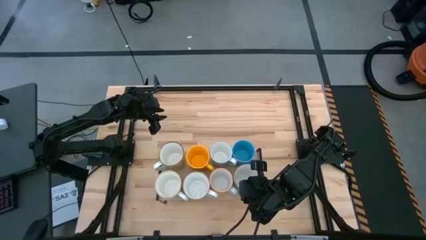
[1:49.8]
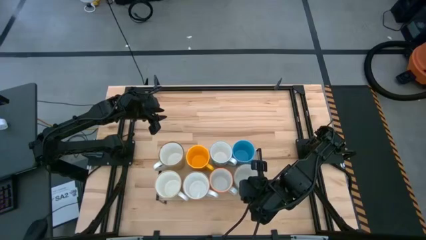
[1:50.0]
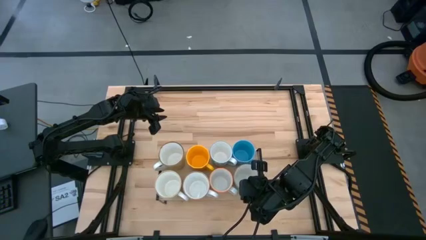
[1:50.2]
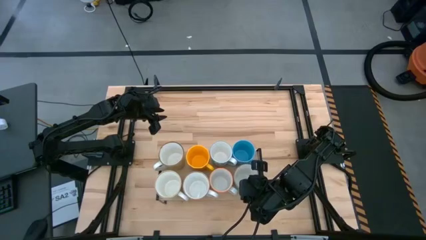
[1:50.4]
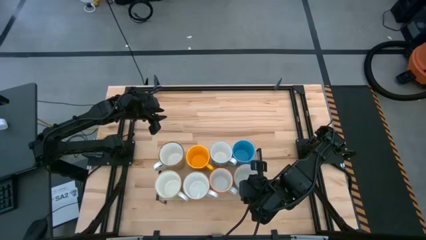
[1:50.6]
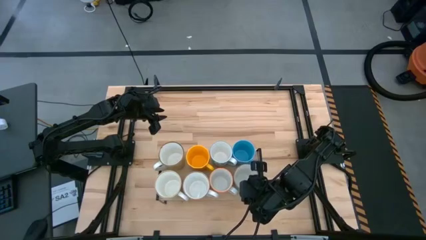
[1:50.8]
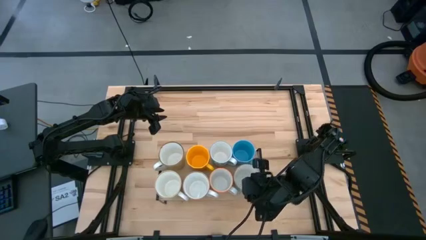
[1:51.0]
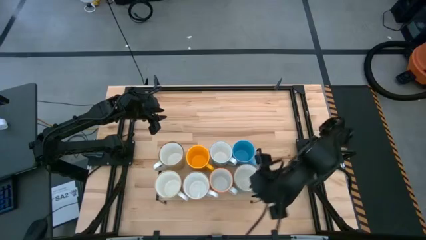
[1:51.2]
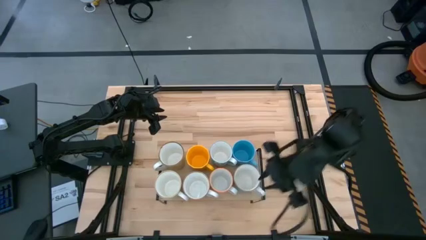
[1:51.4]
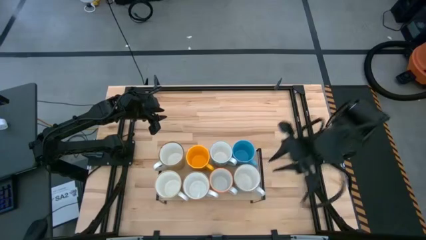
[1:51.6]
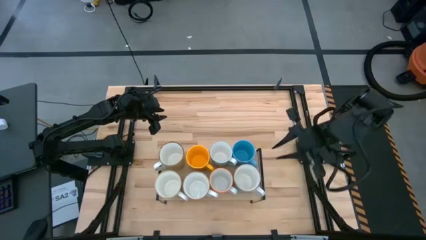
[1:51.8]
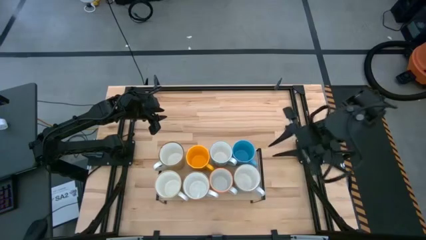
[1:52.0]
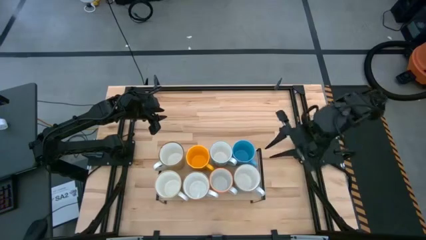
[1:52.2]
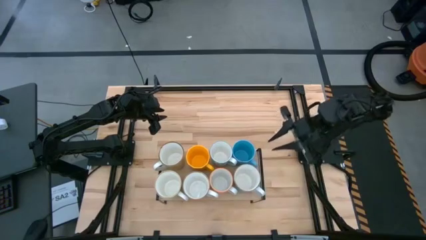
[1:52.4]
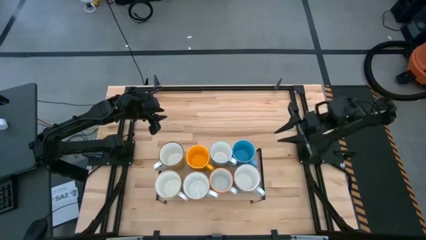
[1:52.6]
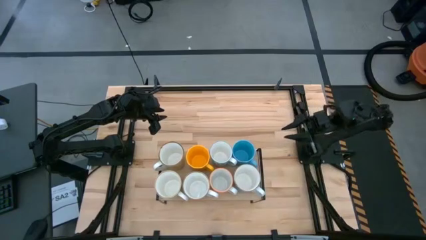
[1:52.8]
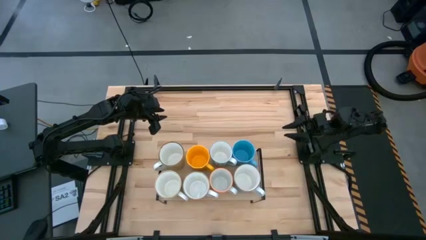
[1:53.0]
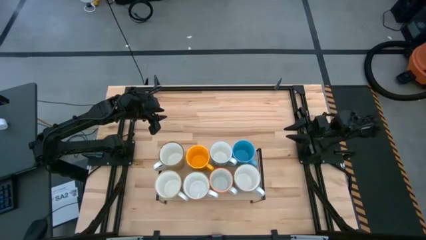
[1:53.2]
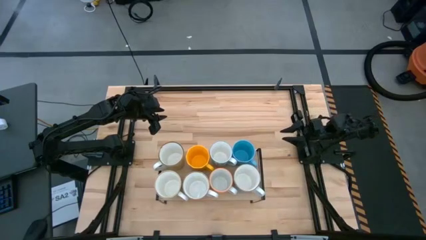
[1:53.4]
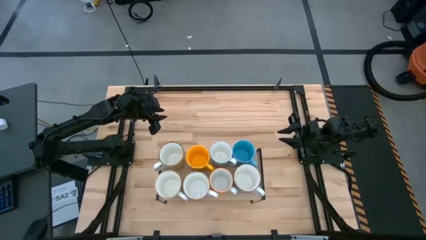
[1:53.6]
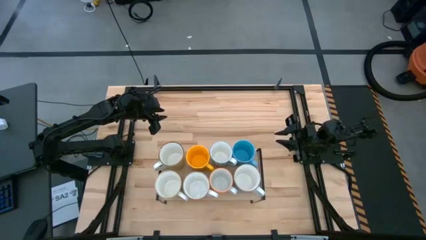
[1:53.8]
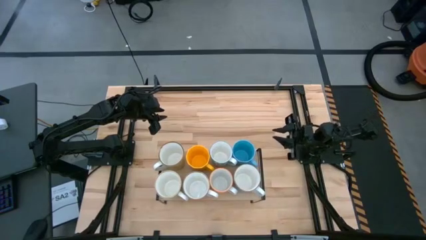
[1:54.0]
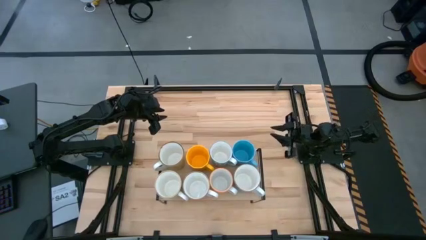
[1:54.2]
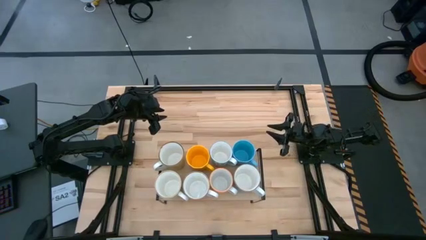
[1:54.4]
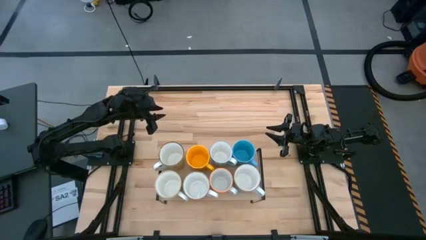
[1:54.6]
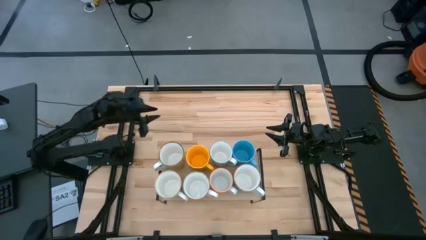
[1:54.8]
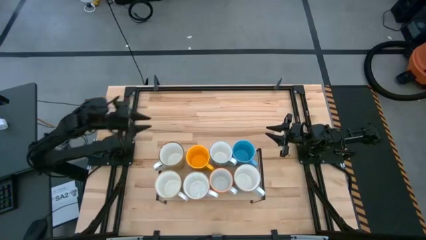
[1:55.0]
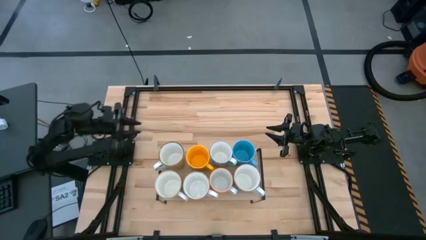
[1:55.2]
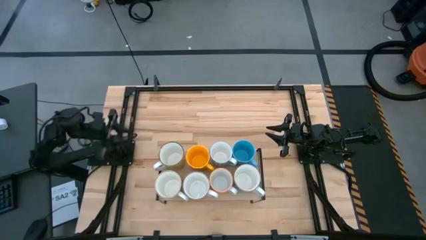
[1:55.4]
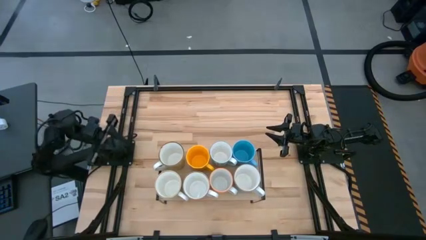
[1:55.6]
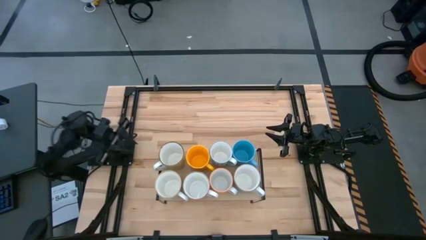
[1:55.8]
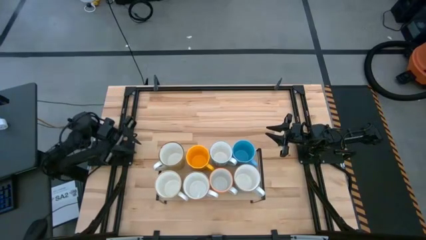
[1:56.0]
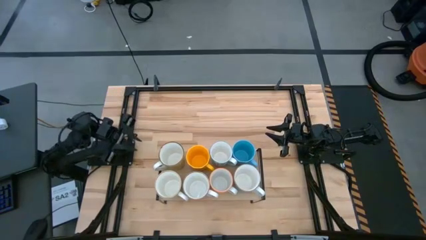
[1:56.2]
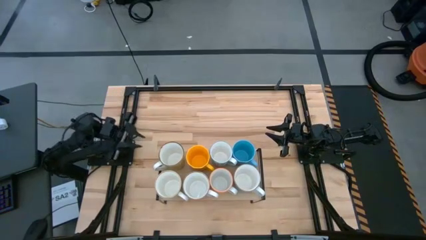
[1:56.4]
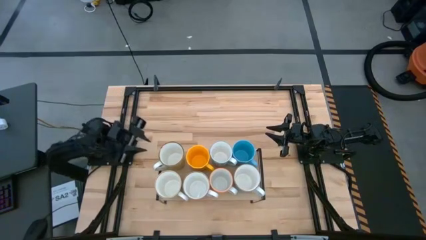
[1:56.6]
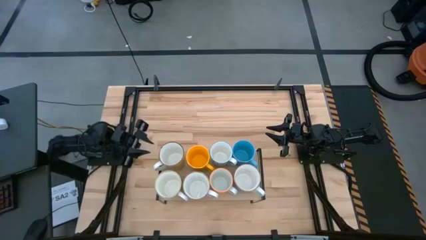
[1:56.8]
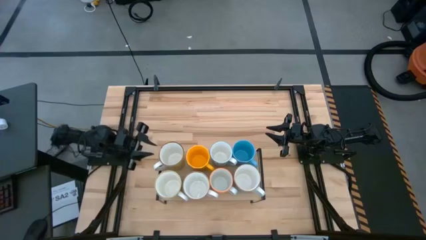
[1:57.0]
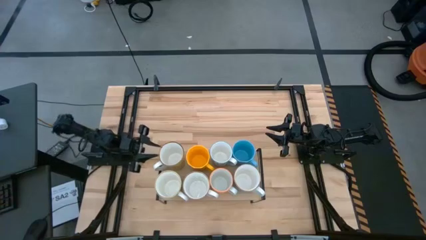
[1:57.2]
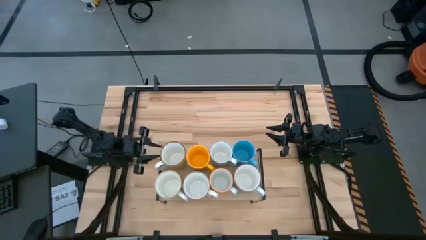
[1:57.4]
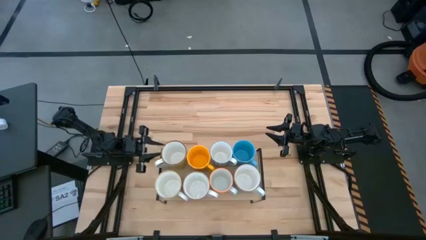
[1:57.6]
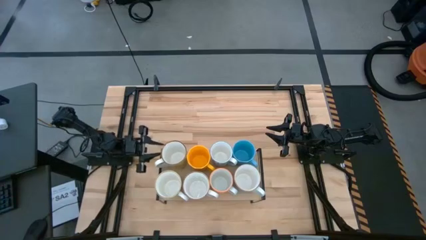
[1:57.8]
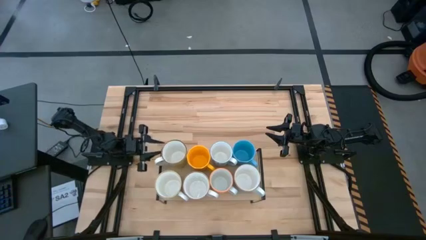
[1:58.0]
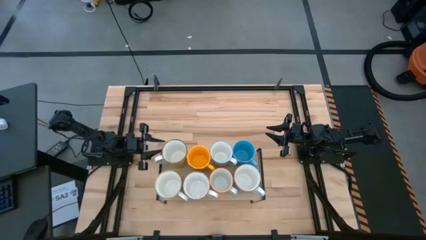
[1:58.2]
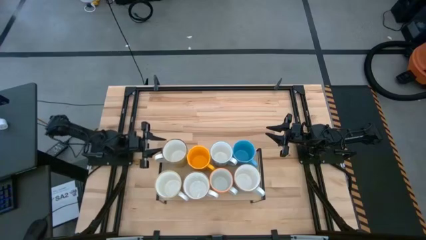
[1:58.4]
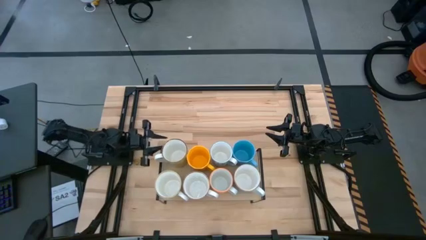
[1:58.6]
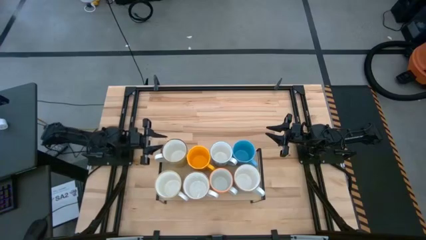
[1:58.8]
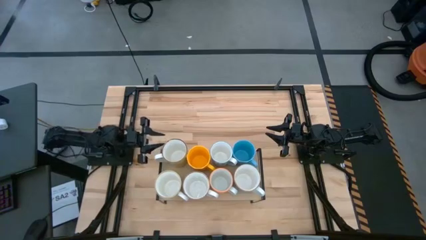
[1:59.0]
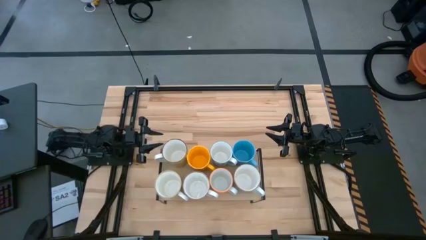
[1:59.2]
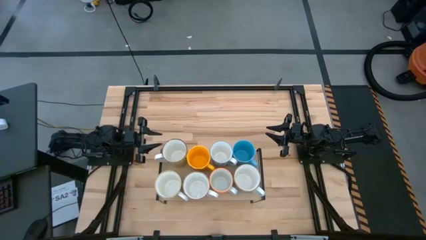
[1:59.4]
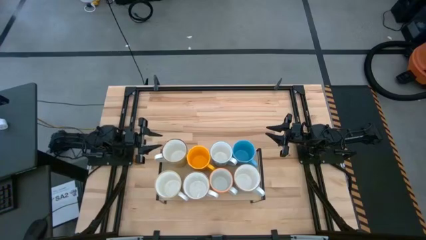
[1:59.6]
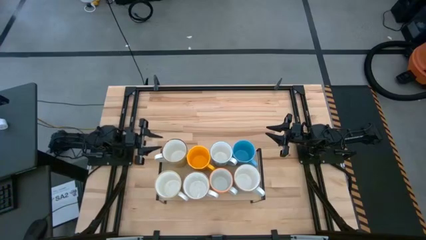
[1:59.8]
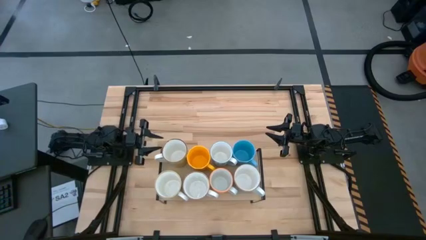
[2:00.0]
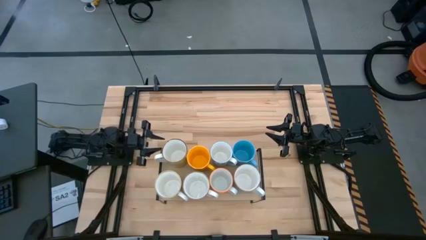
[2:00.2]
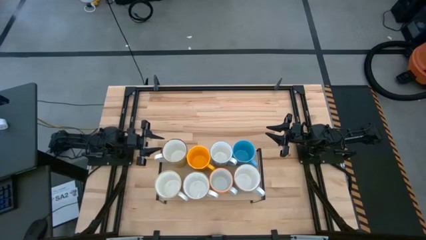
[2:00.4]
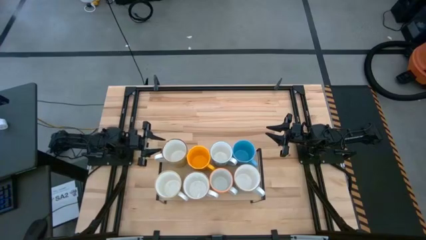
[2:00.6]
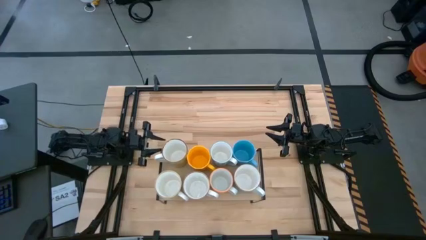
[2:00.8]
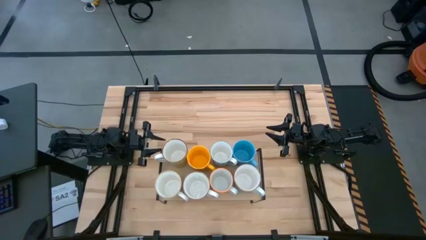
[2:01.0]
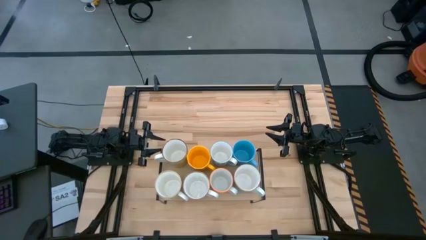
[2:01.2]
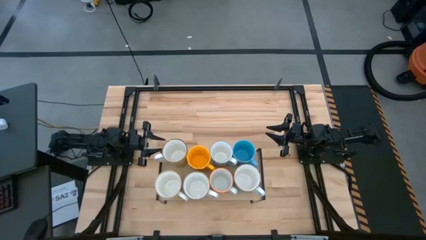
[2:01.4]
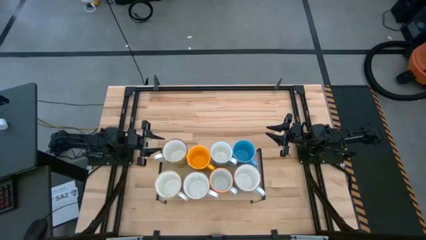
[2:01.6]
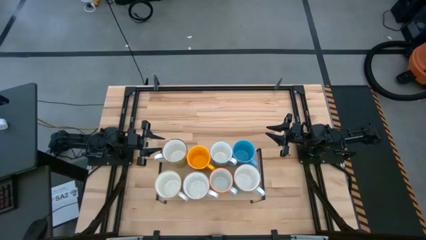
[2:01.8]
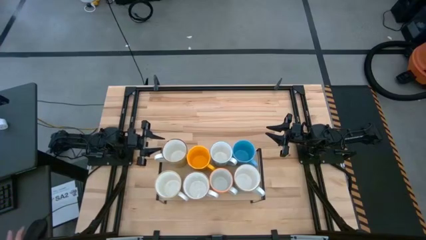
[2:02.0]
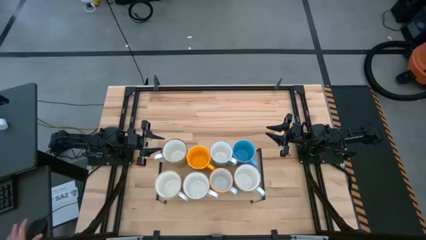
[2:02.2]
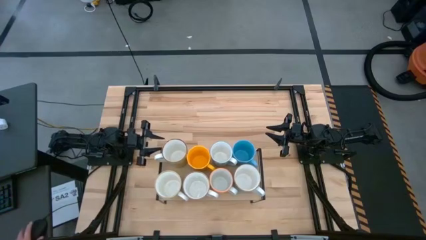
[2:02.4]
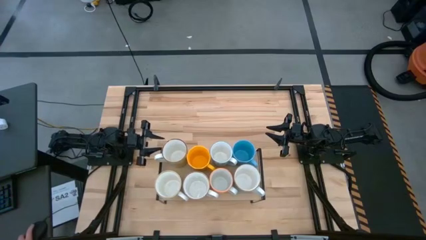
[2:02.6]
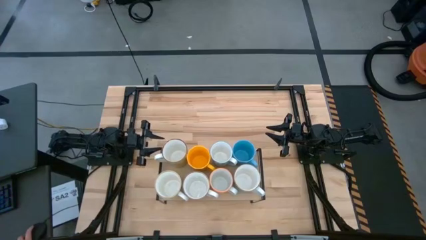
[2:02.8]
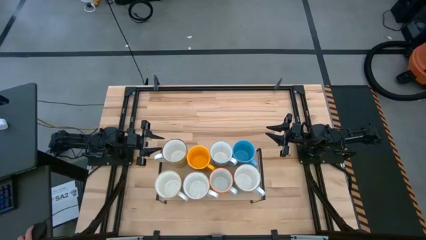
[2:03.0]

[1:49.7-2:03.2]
Task: Place coffee mugs
Return to Home Position

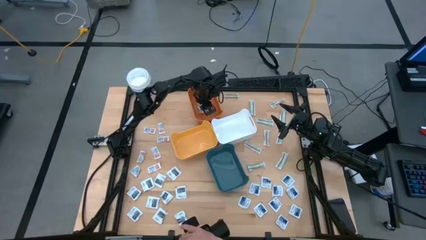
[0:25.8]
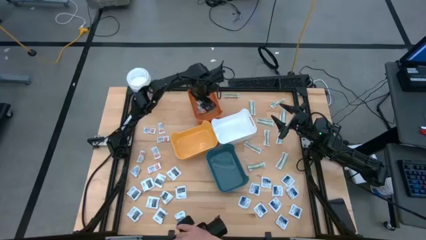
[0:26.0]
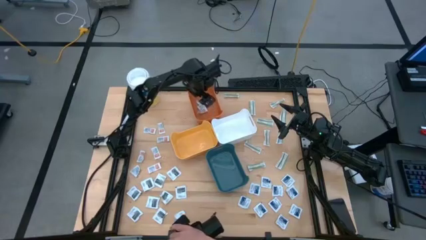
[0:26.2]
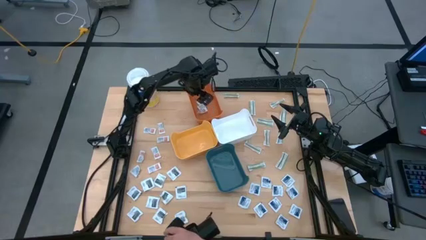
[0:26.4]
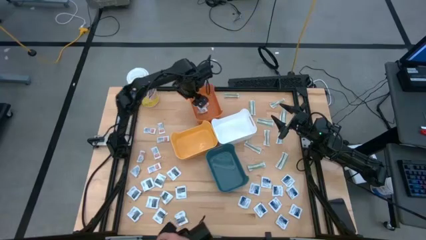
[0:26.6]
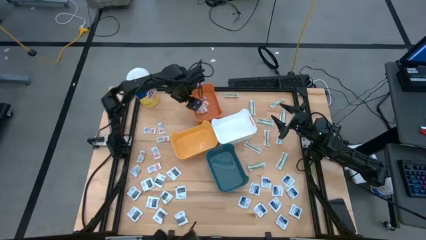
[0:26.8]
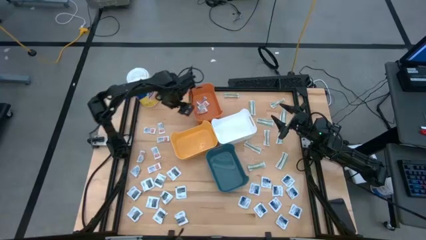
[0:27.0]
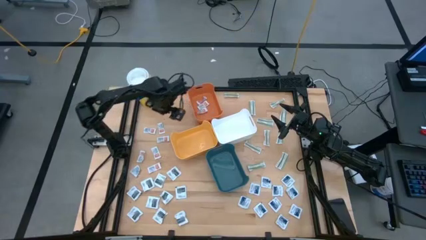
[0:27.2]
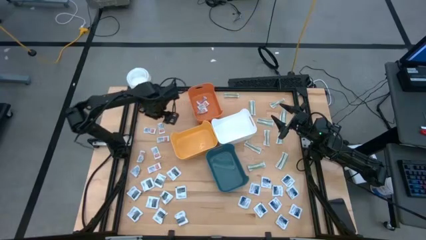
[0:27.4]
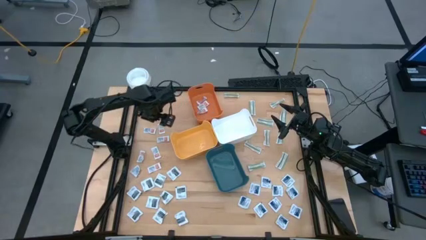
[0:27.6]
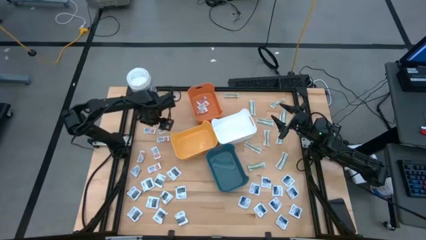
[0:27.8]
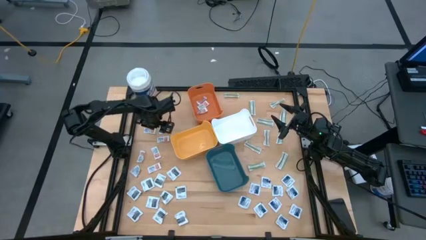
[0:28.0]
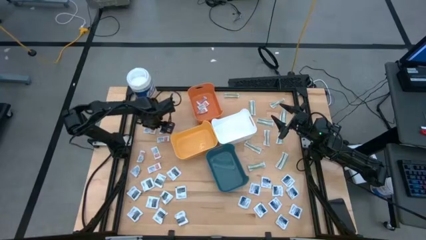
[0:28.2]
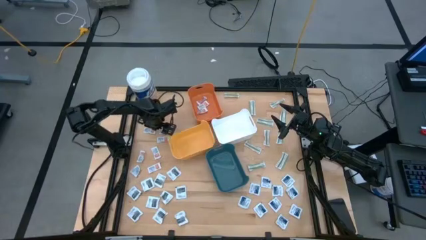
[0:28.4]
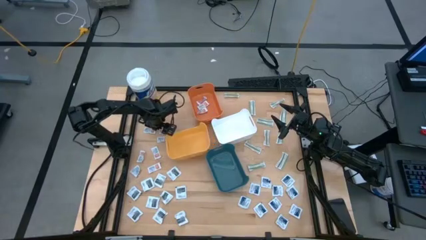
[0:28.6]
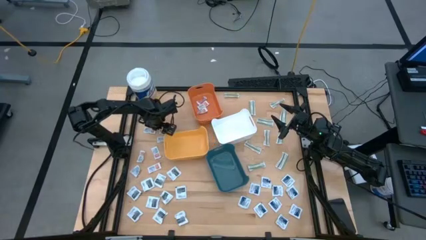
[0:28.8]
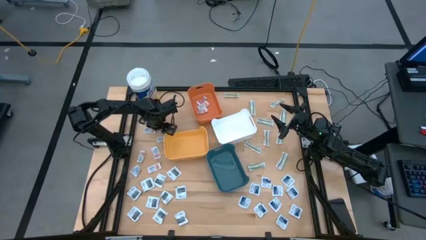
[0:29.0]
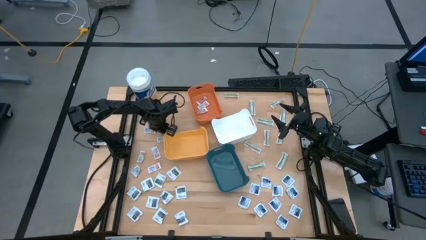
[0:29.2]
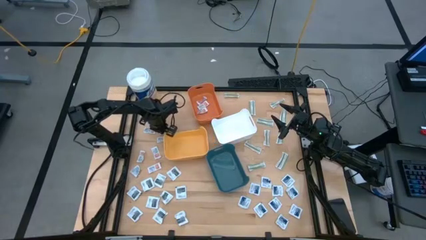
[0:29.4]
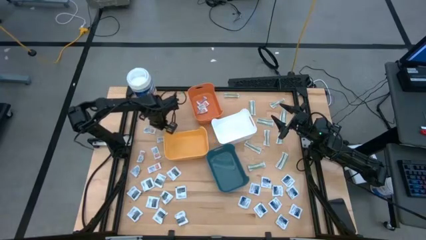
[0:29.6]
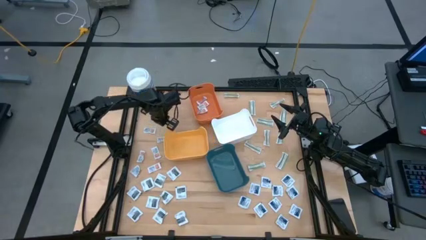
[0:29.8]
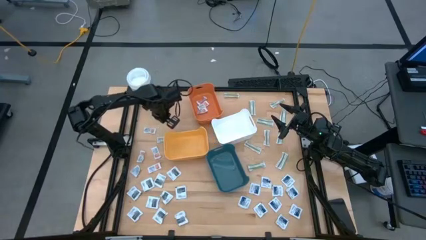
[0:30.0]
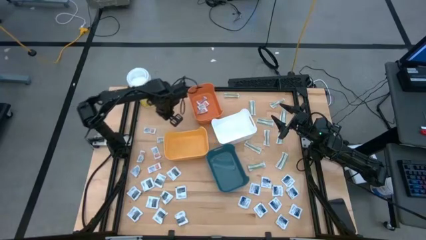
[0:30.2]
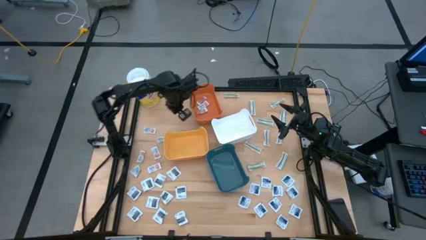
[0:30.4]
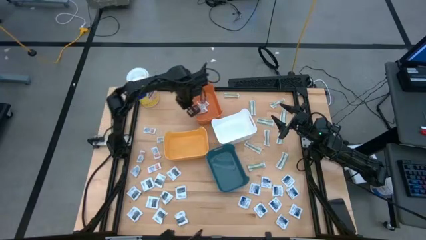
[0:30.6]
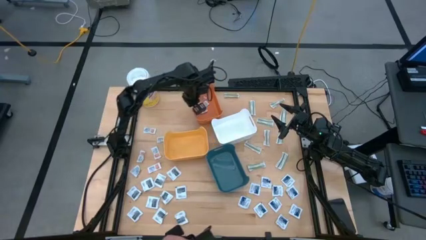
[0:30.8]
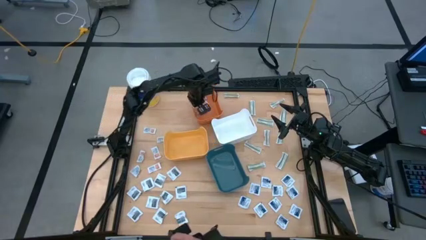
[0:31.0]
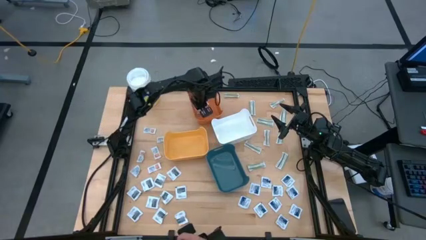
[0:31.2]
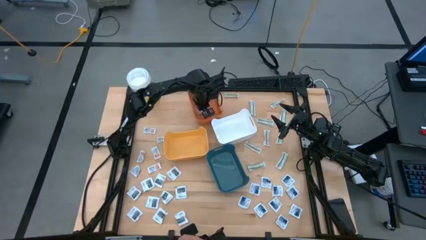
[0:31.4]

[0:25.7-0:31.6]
Task: Pick & Place First Aid Supplies
Put the orange ointment pack into the orange bin
